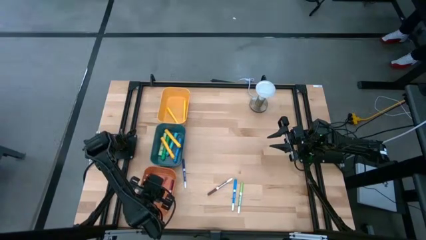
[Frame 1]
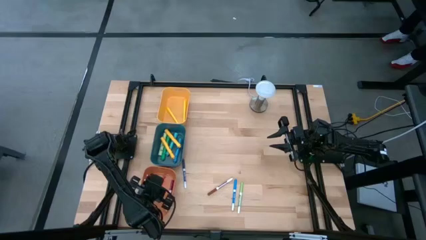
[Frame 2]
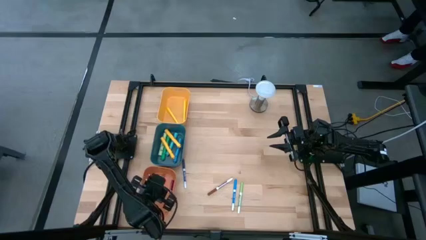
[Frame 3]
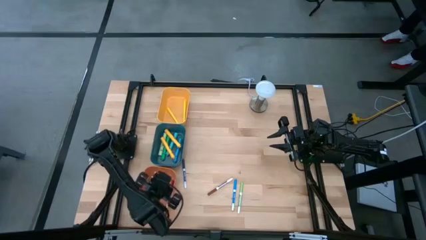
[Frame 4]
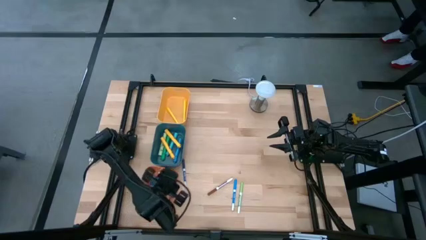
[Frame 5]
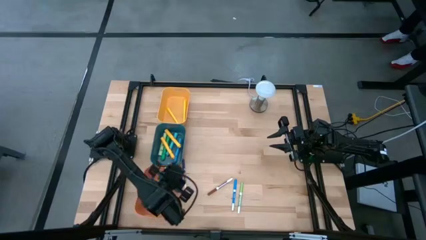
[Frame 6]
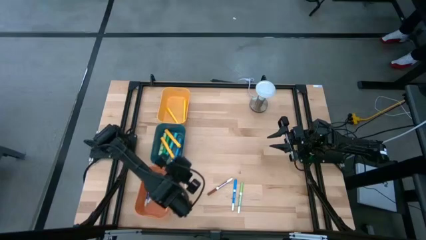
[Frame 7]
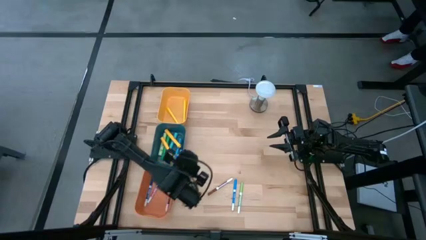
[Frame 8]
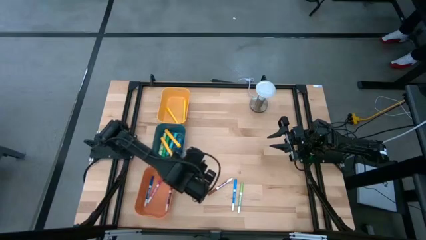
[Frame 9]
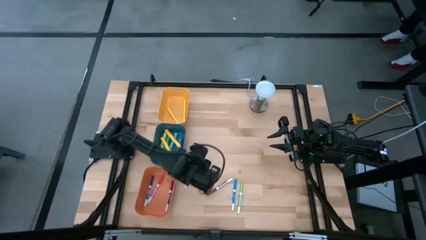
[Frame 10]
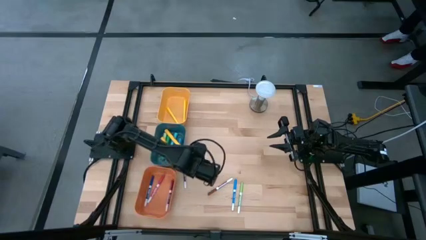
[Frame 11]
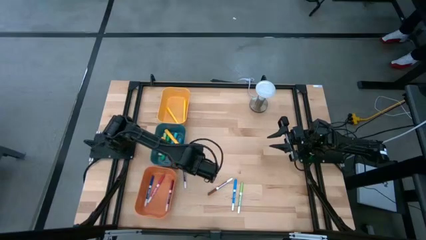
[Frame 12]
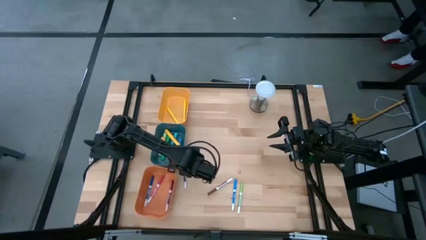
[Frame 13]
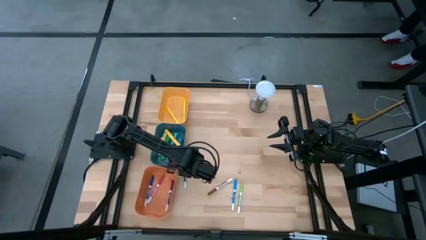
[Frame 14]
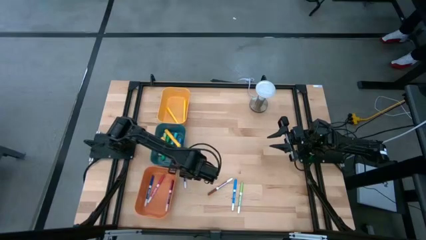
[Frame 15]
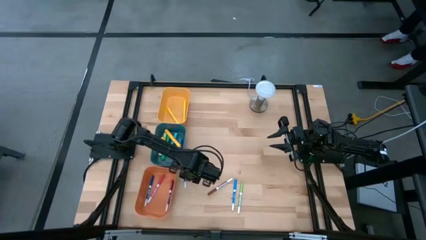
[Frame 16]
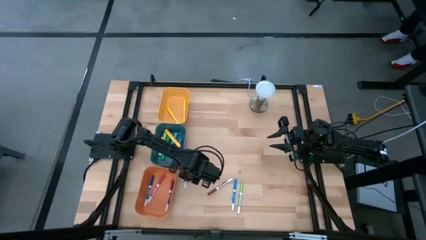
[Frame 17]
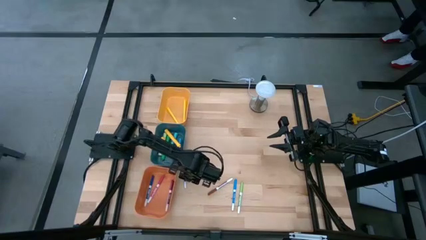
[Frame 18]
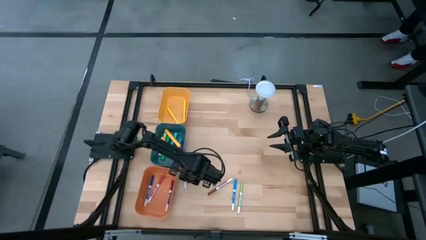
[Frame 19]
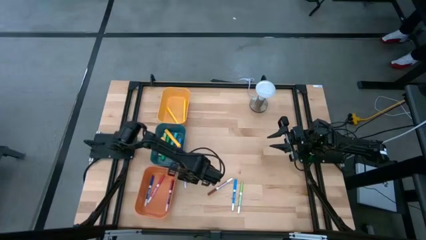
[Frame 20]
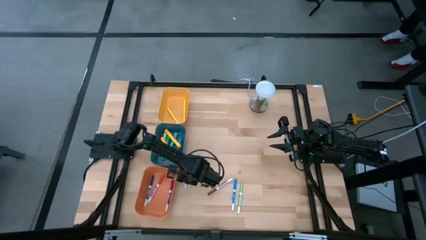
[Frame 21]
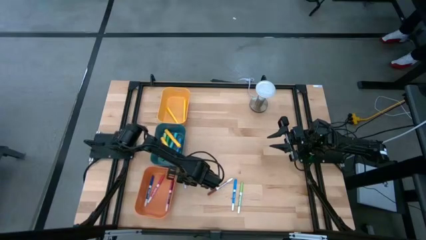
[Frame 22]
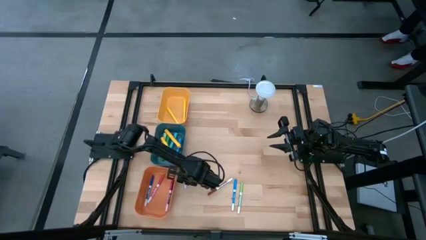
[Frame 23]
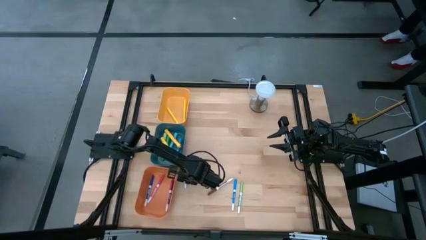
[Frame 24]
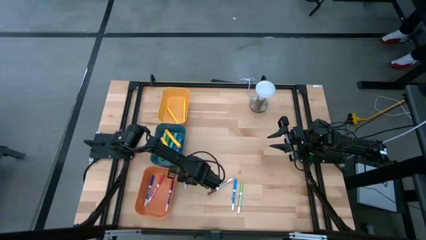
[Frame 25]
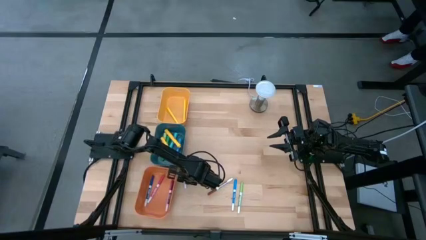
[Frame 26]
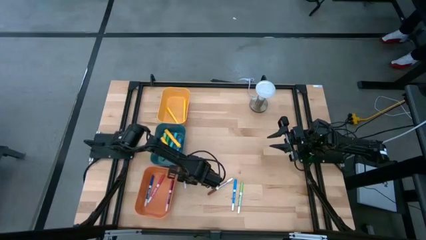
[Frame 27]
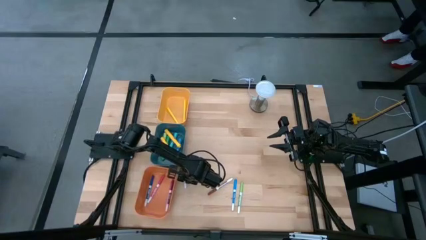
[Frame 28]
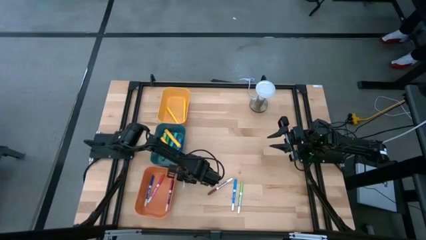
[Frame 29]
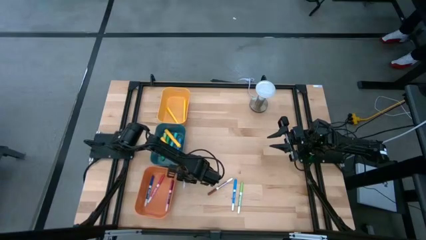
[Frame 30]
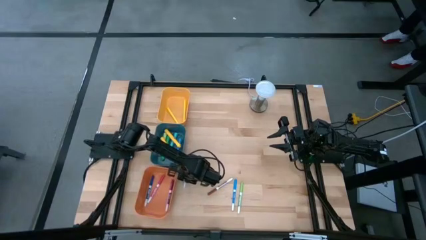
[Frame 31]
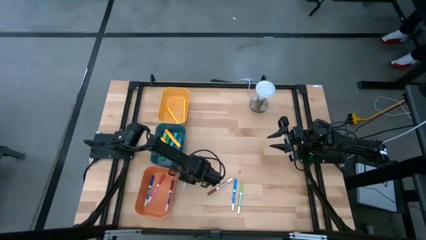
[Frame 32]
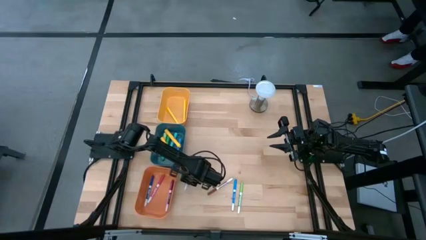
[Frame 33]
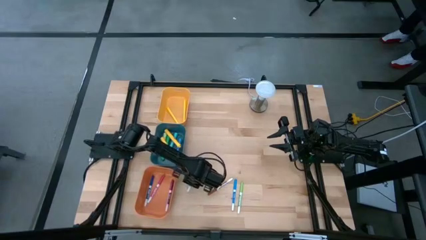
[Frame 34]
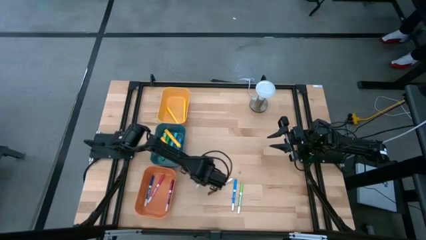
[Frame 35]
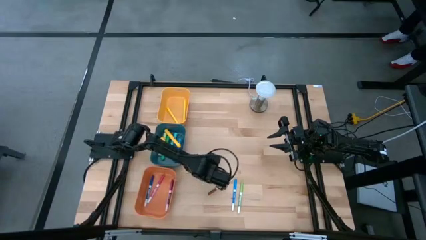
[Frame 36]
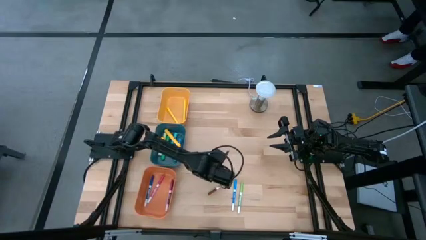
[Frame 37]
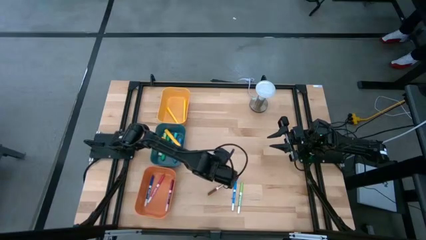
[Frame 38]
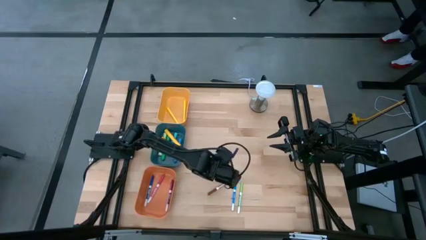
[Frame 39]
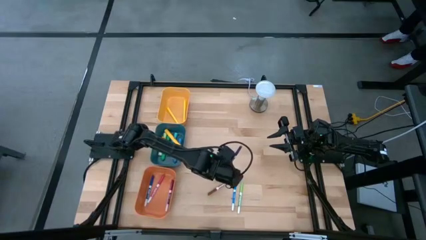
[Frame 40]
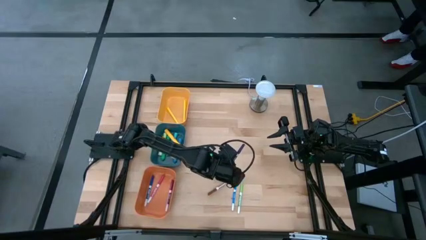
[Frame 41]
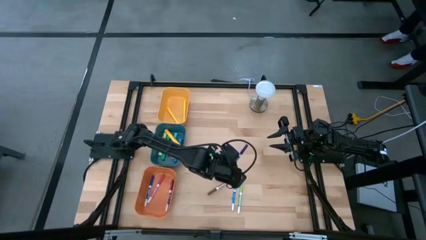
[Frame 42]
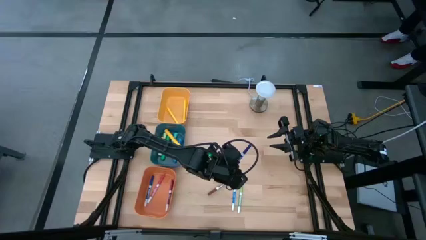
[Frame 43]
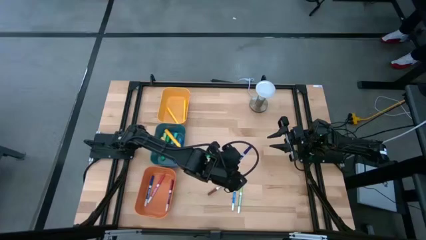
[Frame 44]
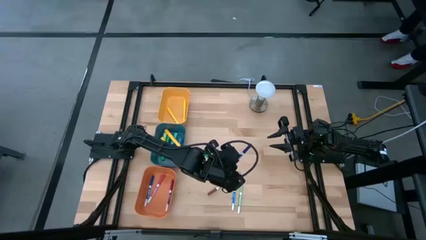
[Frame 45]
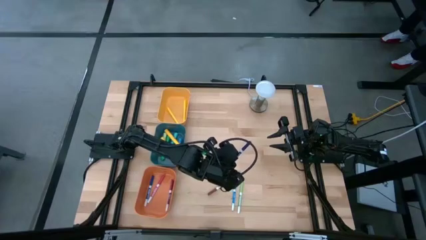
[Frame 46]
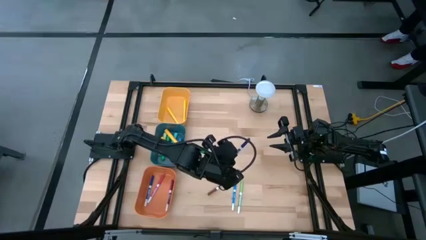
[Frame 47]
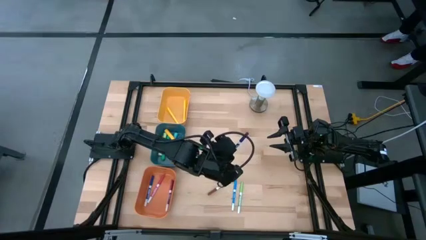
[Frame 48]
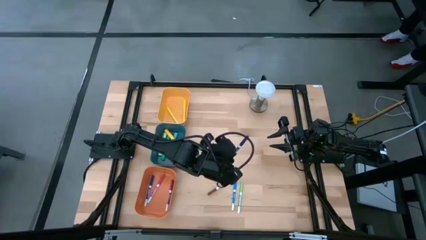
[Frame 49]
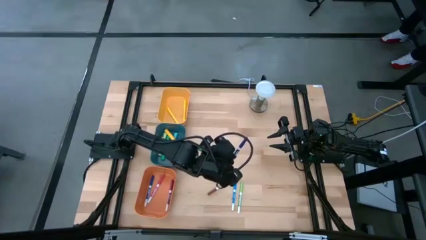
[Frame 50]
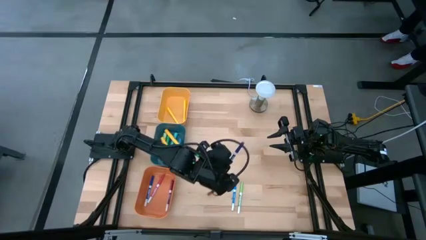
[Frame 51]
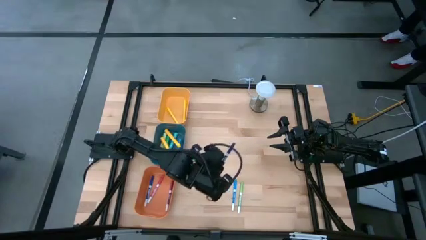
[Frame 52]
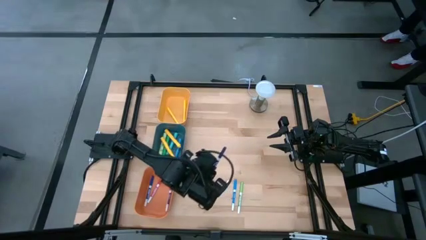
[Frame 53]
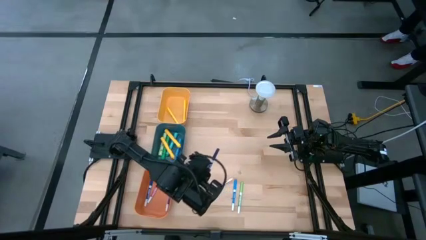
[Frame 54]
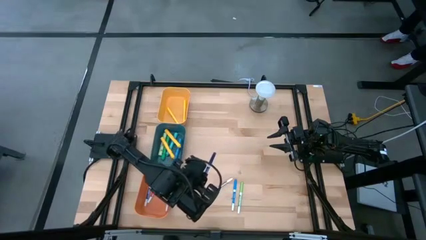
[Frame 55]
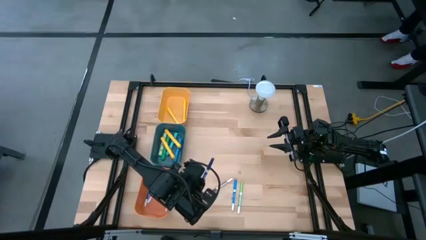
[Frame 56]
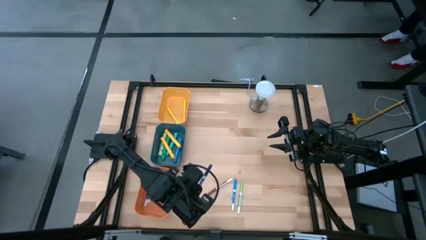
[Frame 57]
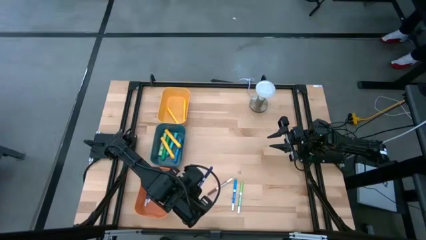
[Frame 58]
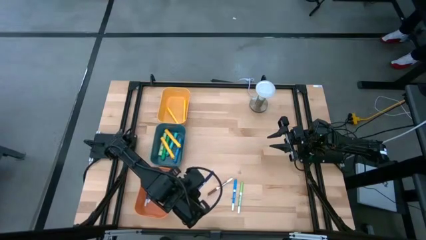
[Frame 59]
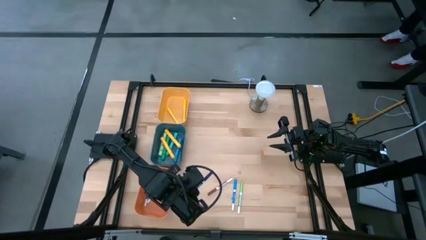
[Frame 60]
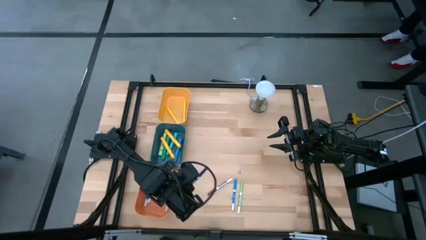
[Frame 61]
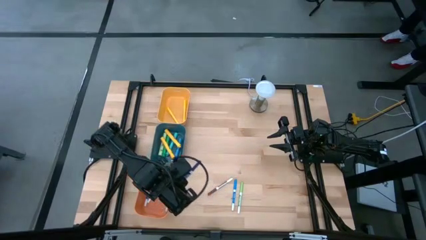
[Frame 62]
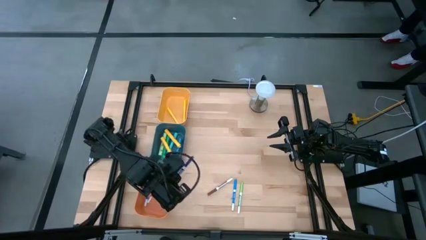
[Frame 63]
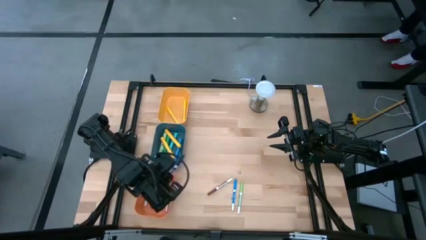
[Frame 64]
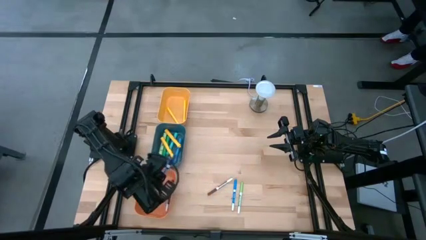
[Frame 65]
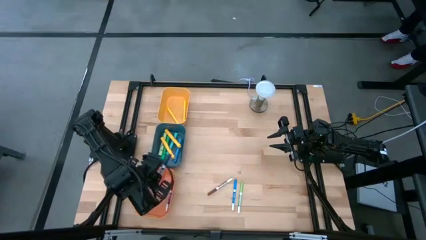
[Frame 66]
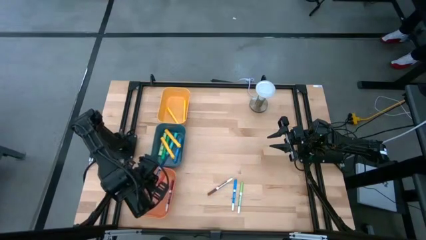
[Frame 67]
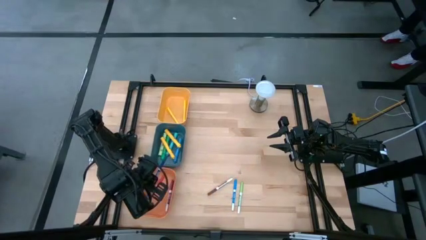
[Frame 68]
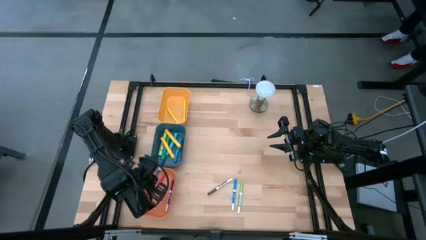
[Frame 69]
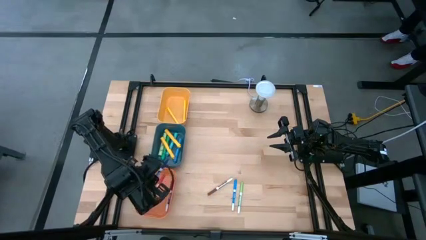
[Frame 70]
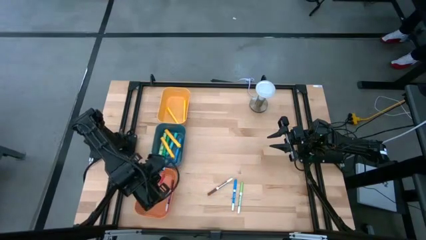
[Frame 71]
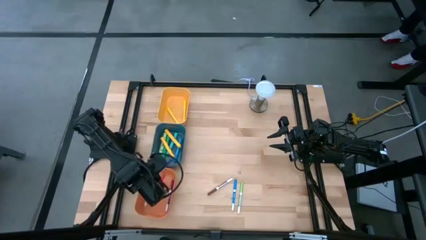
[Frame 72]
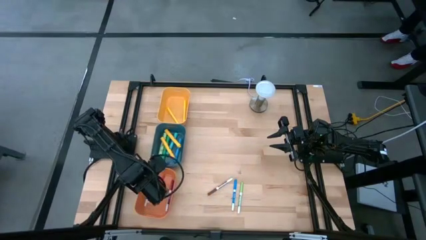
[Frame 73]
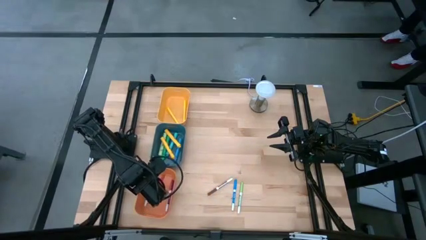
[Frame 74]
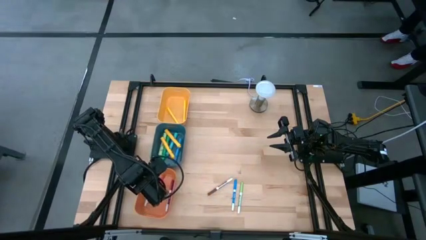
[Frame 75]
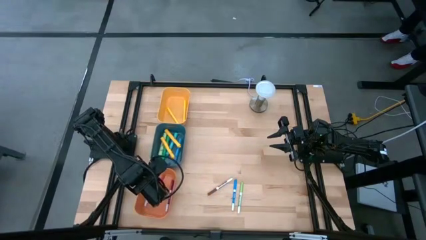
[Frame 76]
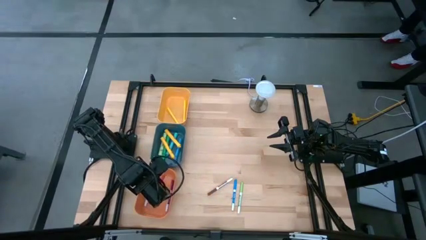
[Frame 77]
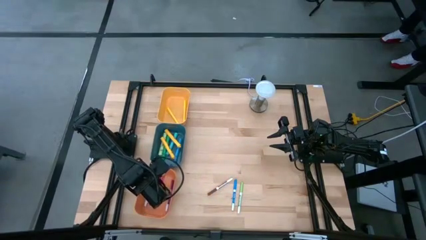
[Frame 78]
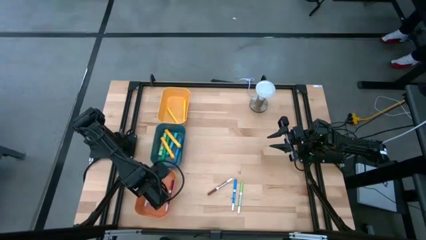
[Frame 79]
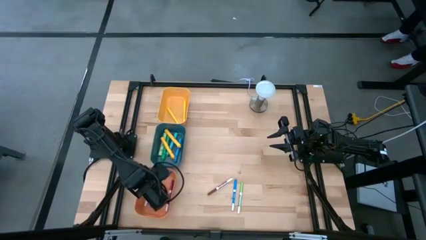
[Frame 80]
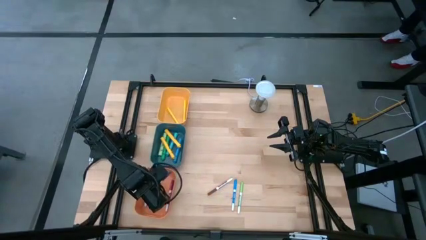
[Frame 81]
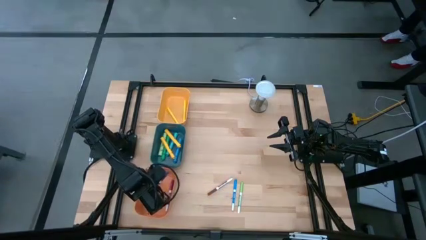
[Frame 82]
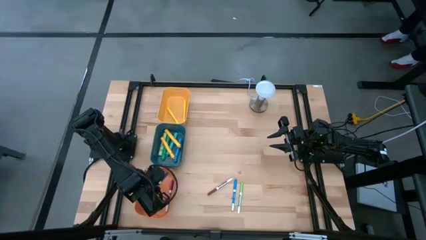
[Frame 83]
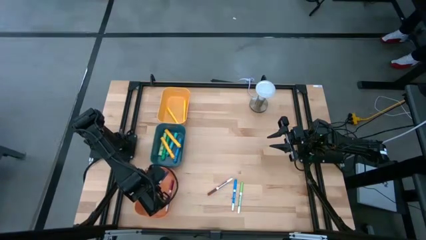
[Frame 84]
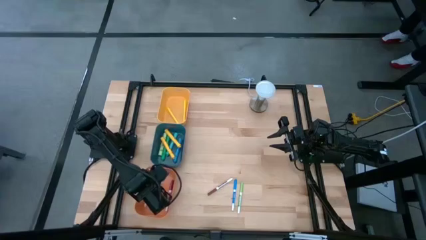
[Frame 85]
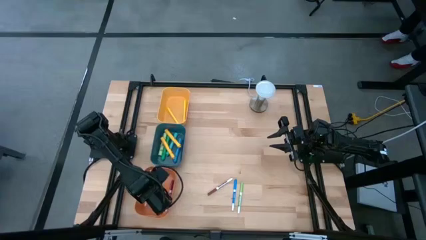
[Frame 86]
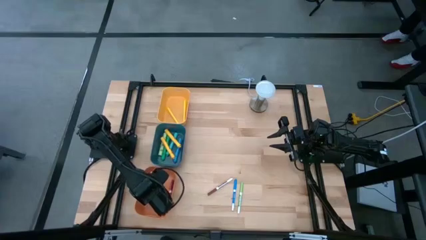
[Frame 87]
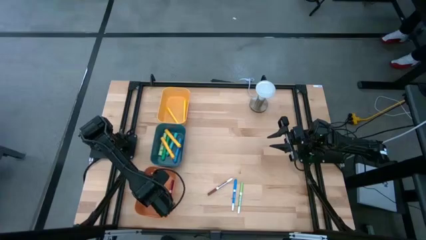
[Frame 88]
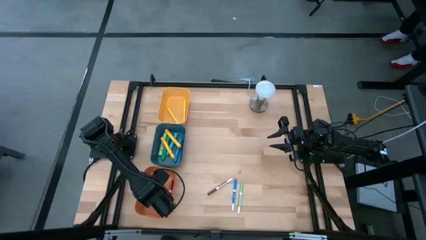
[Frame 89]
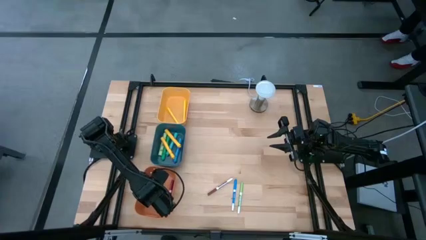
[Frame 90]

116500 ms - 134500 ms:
Task: Pick & Place Markers
Put the blue marker pen into the orange bin
